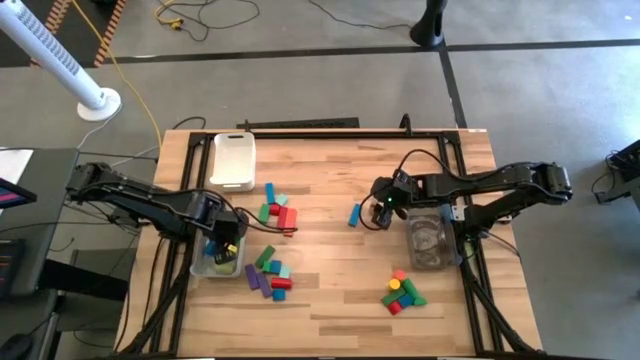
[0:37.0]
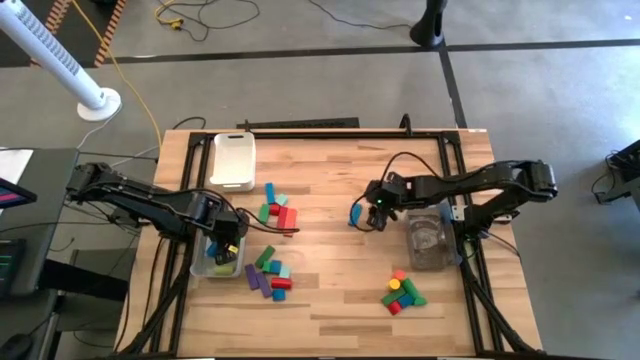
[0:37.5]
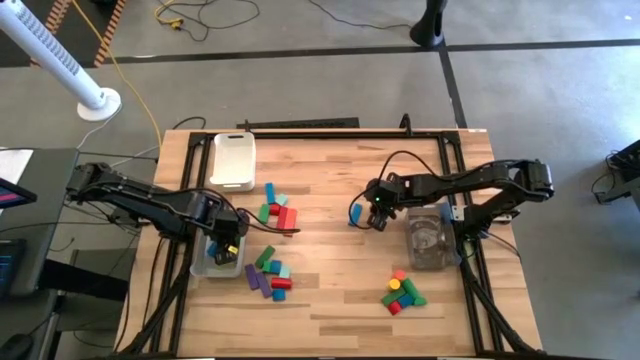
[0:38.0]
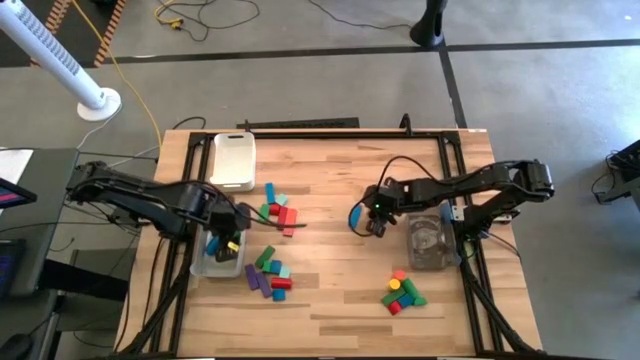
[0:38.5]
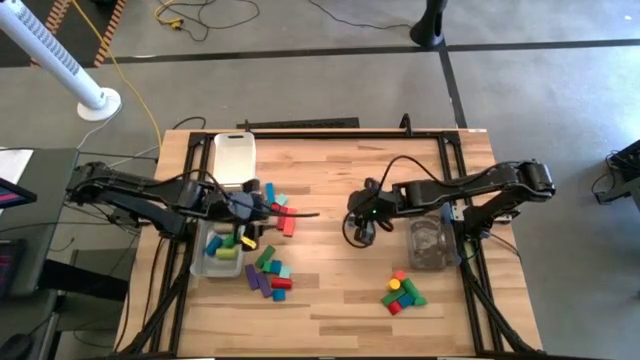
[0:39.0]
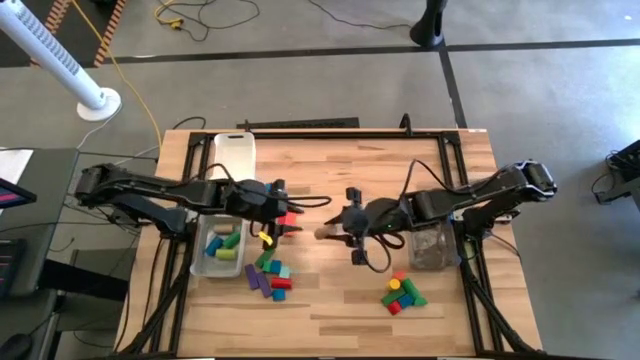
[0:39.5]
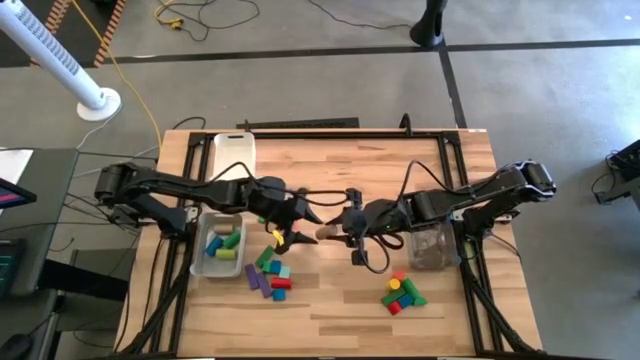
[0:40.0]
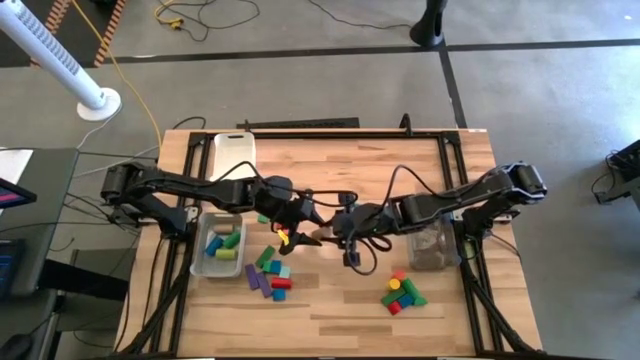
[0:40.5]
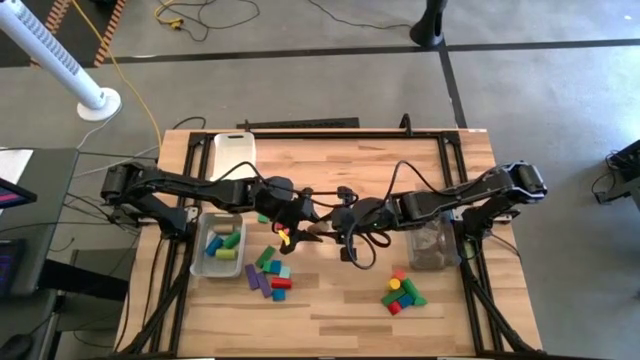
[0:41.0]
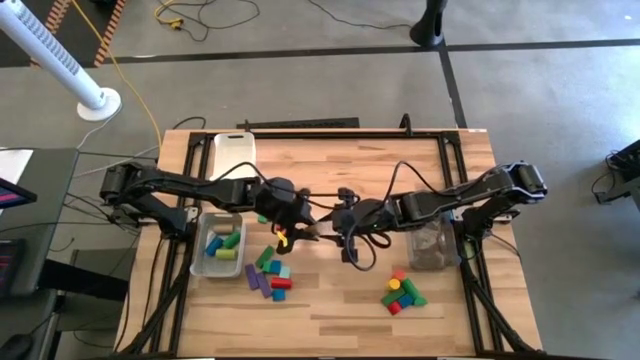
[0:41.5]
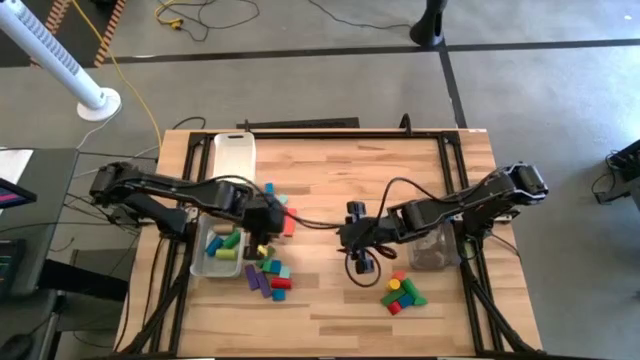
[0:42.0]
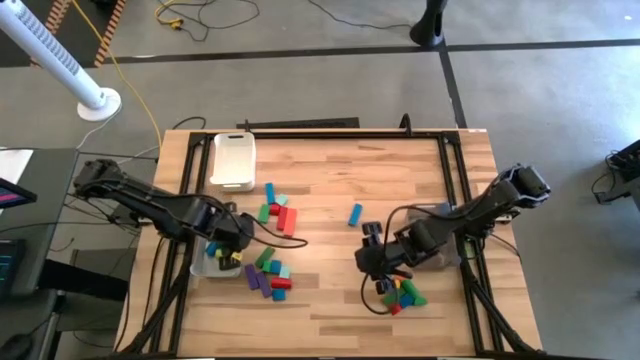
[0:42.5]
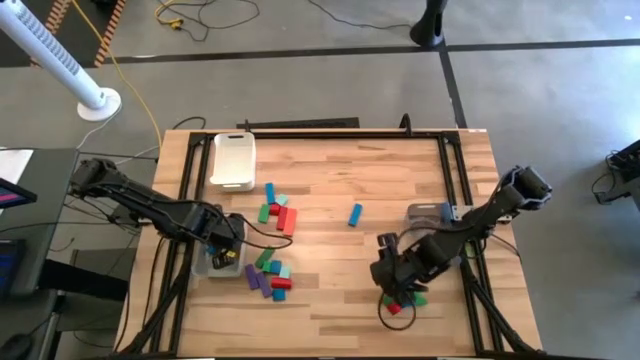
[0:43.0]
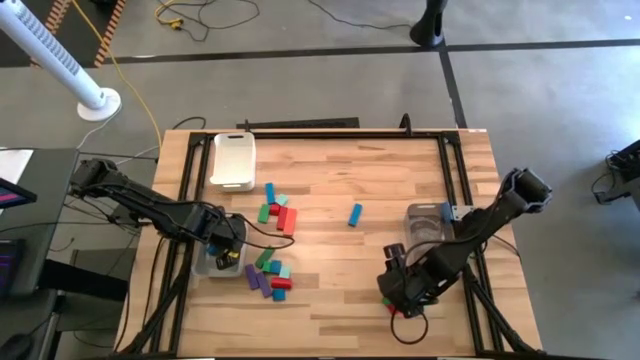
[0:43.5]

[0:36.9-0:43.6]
Task: Sort blocks by size
Put the brown cylindrical block into the gray bin

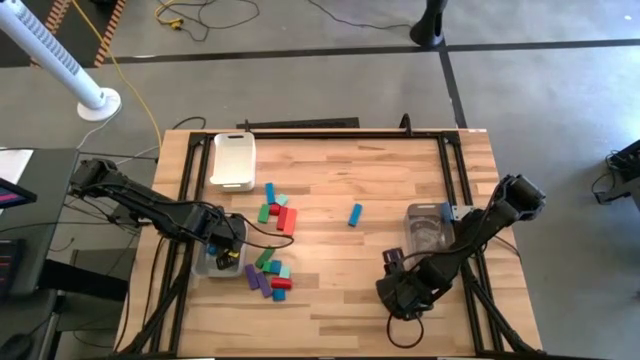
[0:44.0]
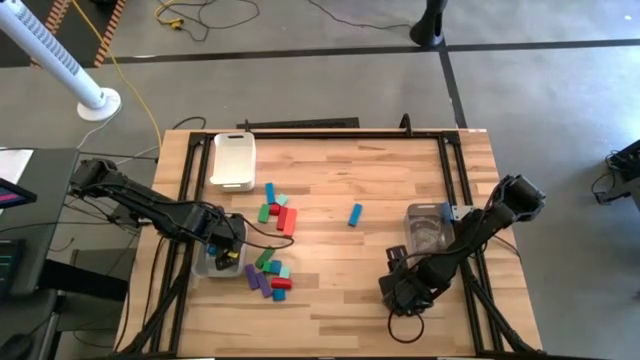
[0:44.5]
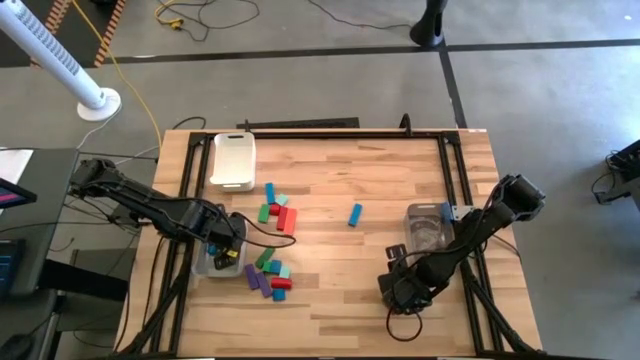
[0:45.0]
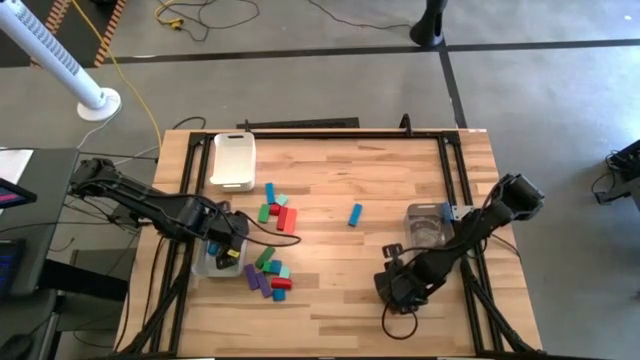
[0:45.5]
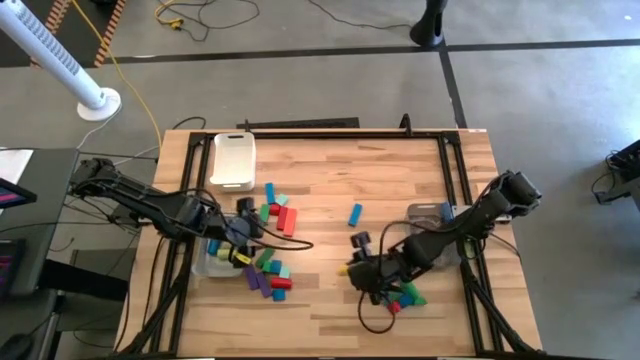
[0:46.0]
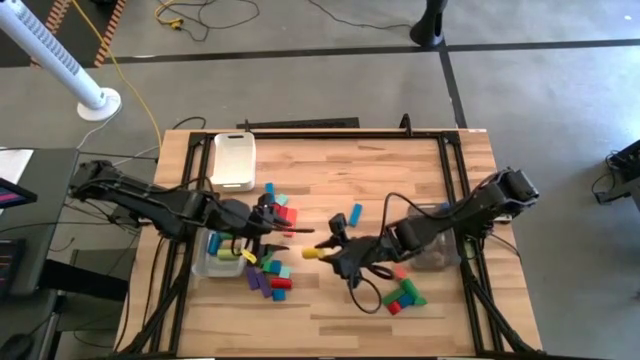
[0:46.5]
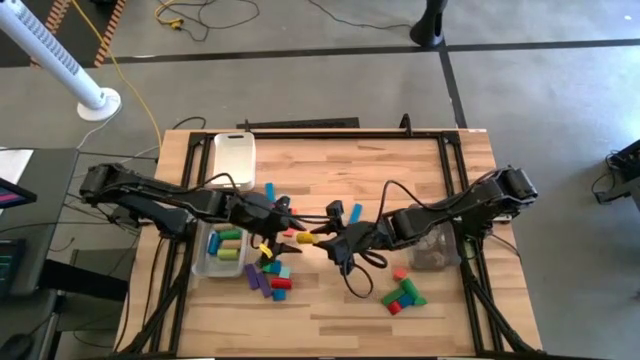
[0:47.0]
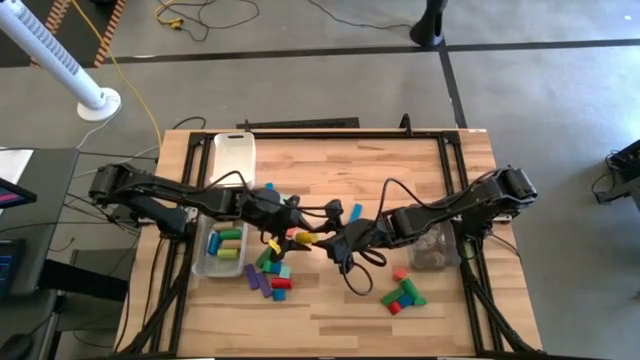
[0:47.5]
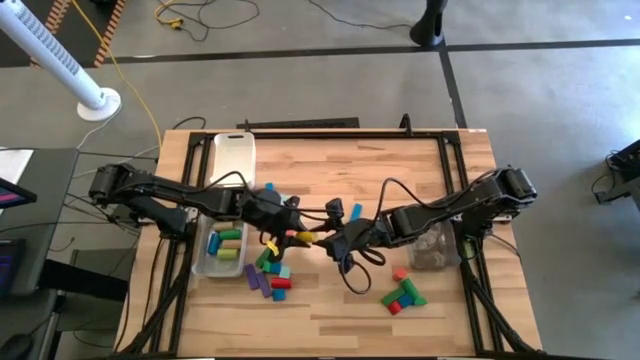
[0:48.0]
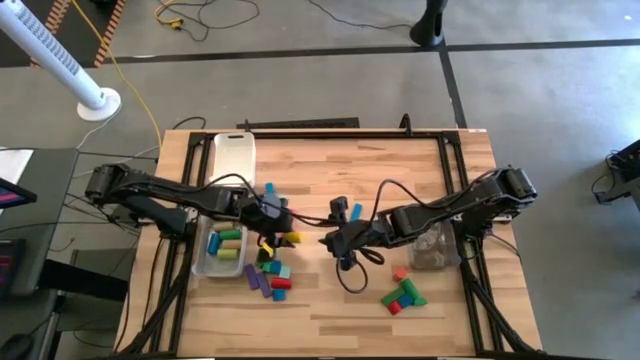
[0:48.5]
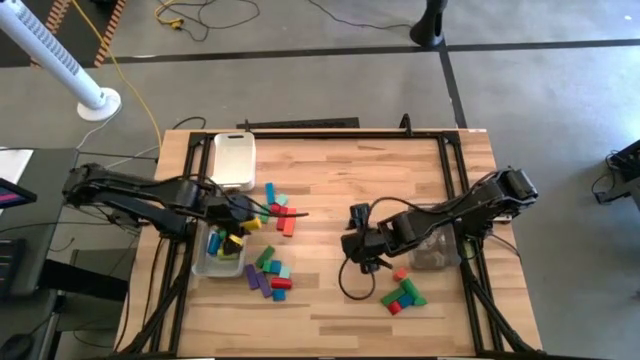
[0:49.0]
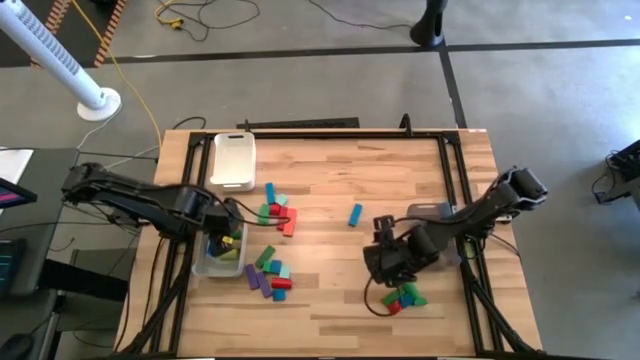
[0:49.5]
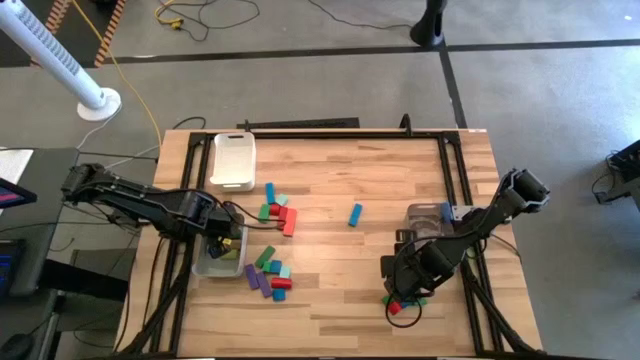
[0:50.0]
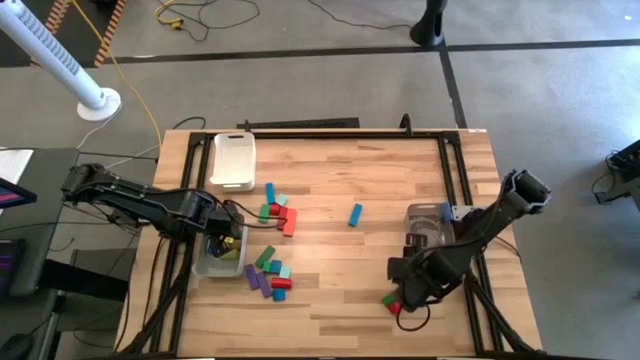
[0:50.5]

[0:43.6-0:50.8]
Put the yellow cylindrical block into the gray bin

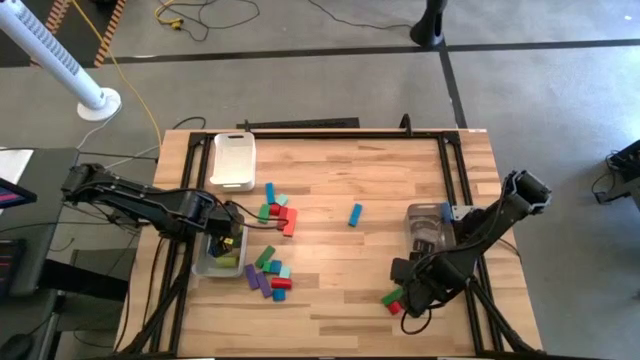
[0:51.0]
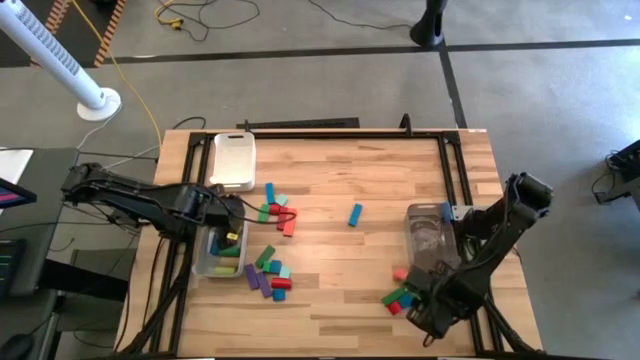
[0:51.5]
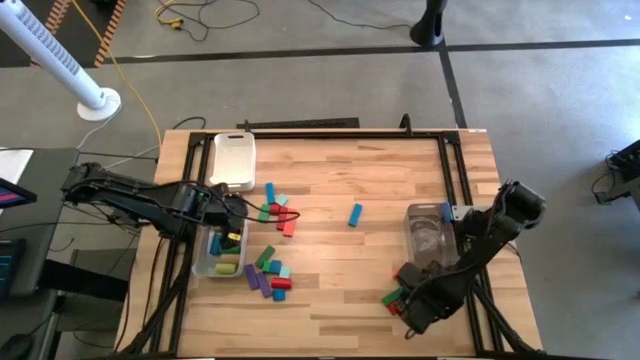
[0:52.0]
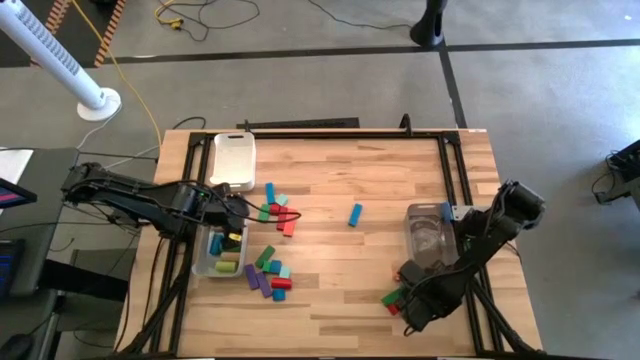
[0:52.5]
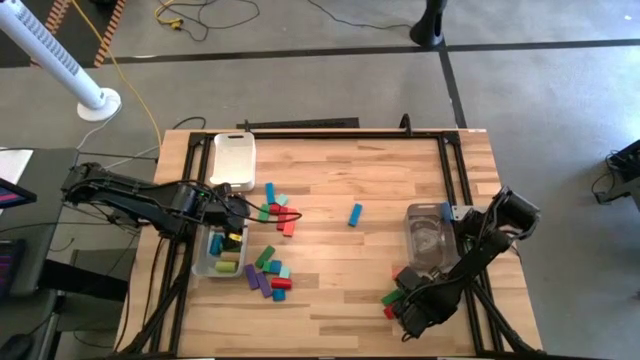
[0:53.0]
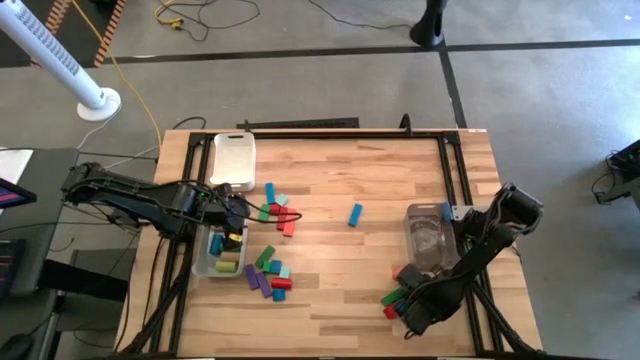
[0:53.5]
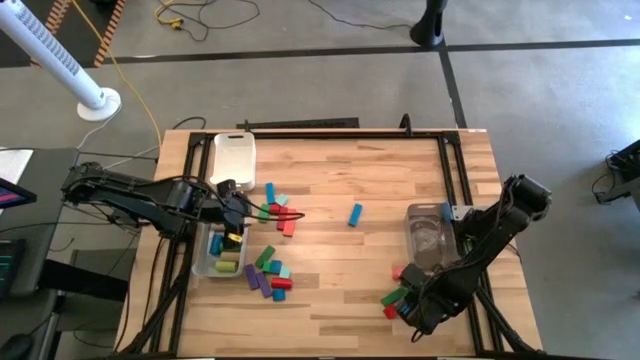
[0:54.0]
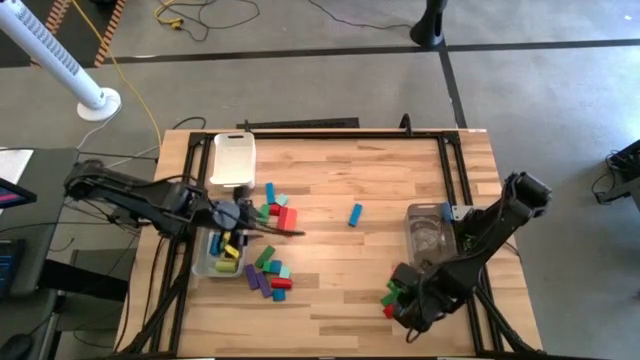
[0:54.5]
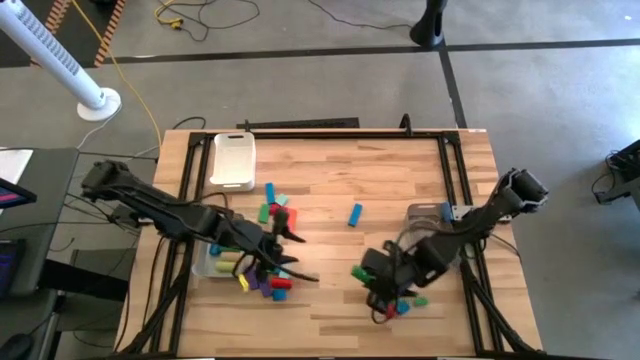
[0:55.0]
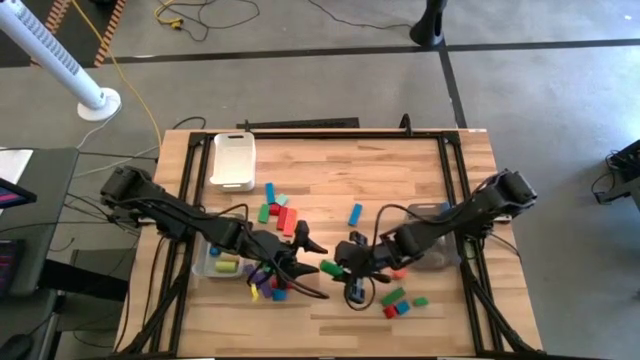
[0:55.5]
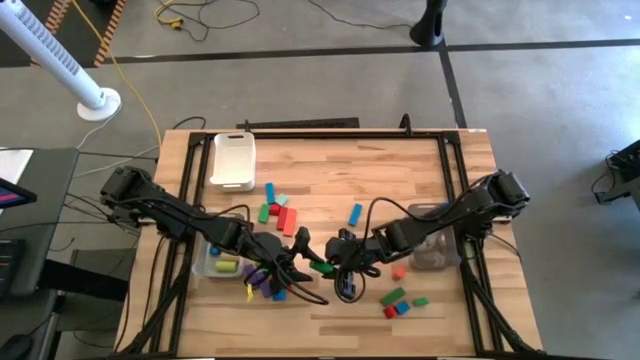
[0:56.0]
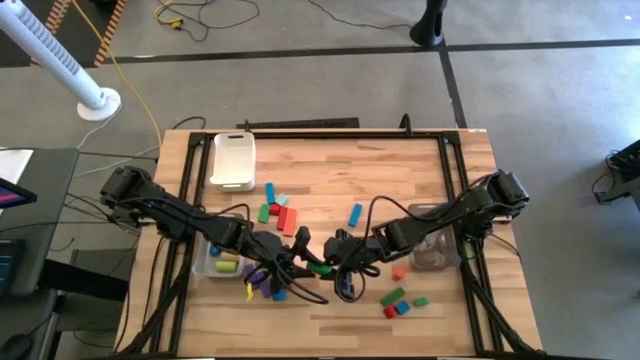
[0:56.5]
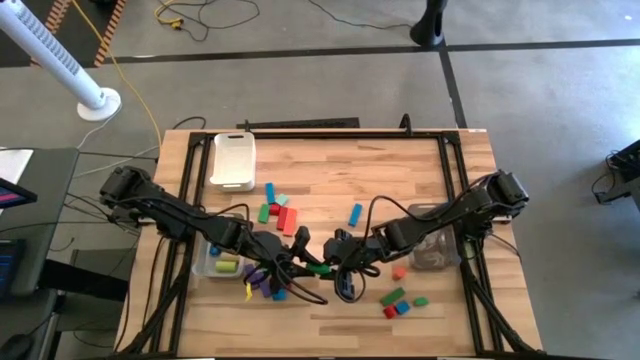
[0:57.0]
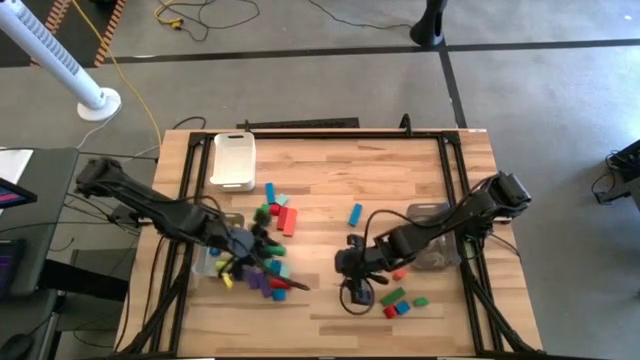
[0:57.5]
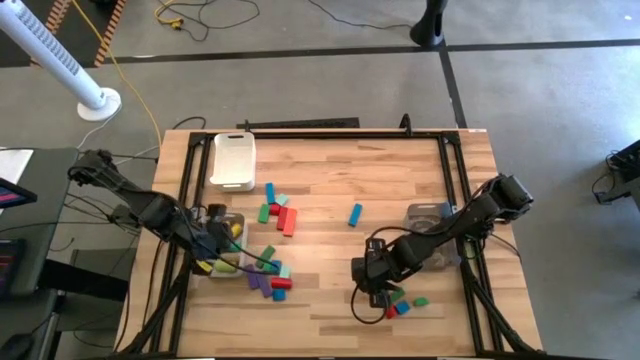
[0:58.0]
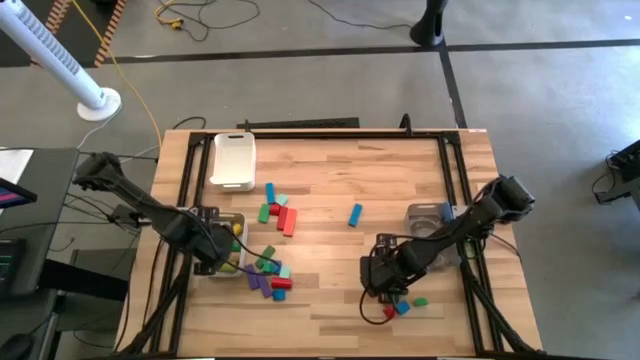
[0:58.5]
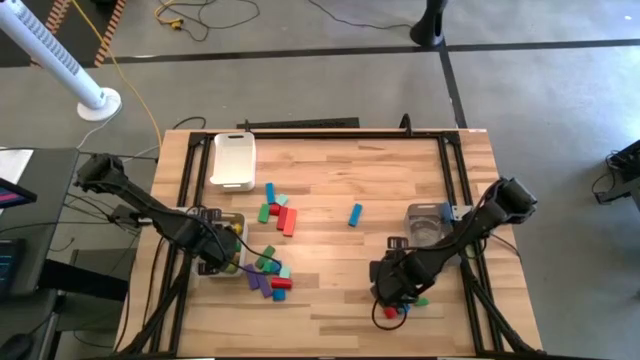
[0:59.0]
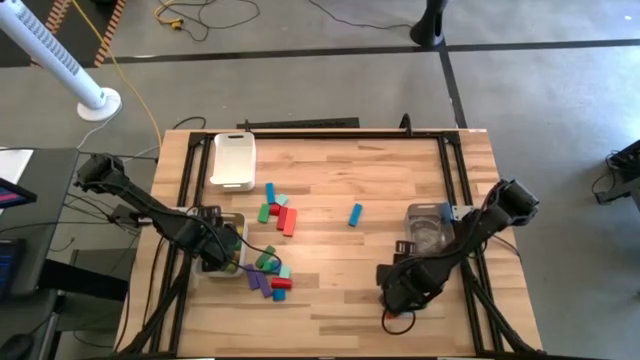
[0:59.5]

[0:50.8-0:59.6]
Put the dark green cylindrical block into the gray bin
